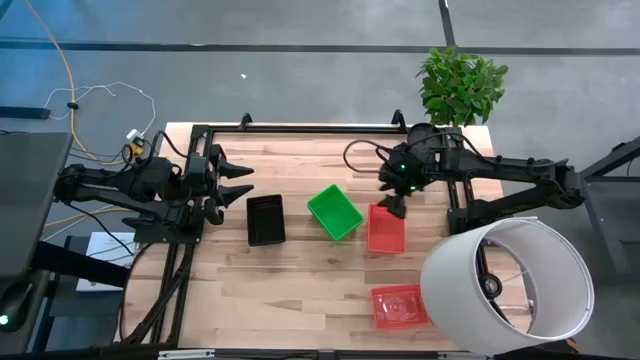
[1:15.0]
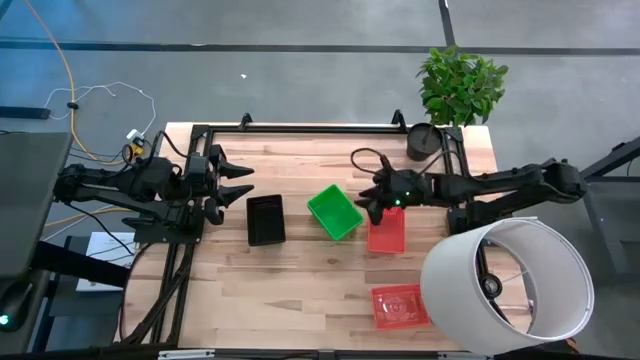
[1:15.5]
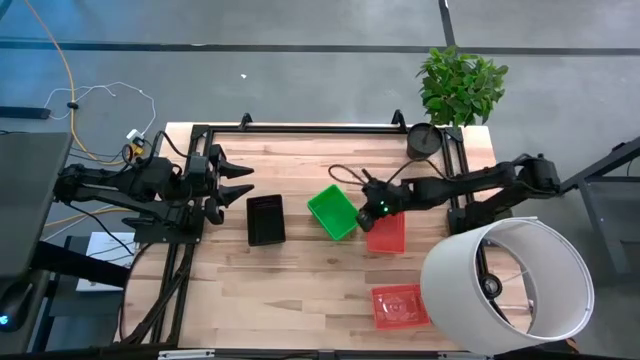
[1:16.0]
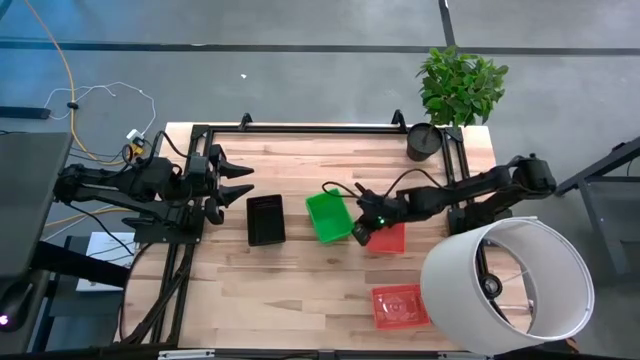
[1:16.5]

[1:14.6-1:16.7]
Adjust the stacked green baskets

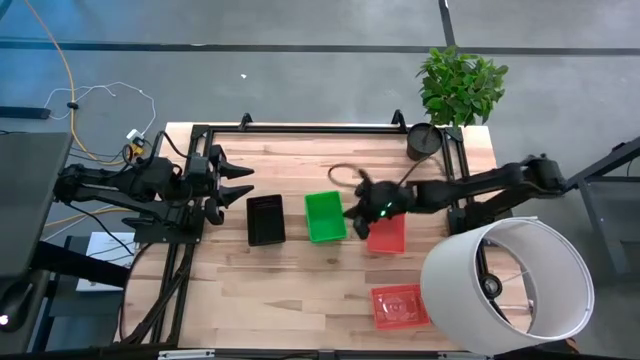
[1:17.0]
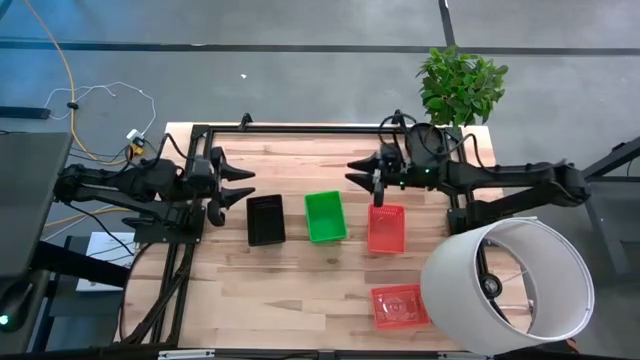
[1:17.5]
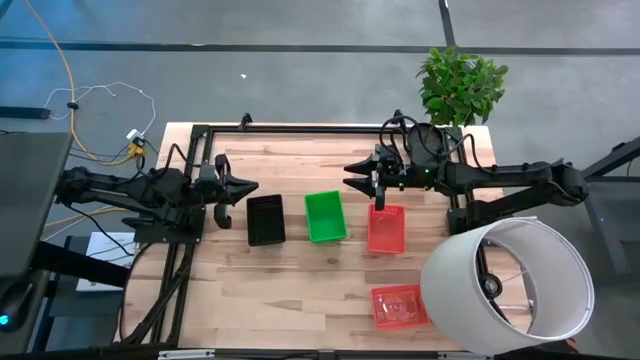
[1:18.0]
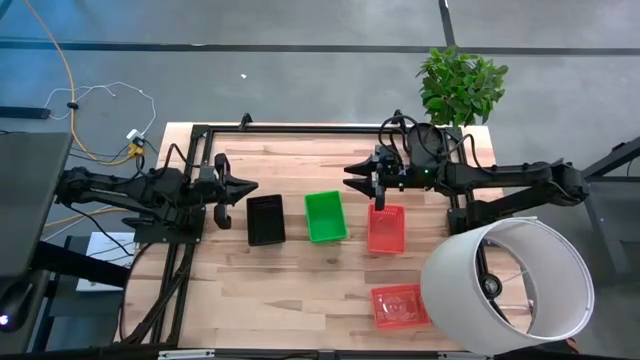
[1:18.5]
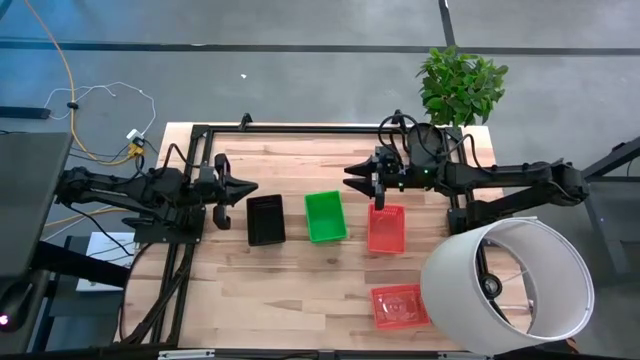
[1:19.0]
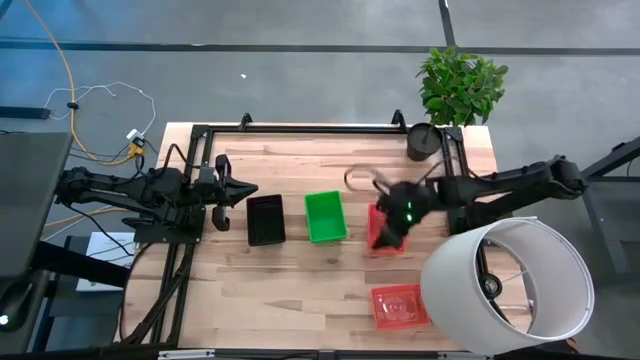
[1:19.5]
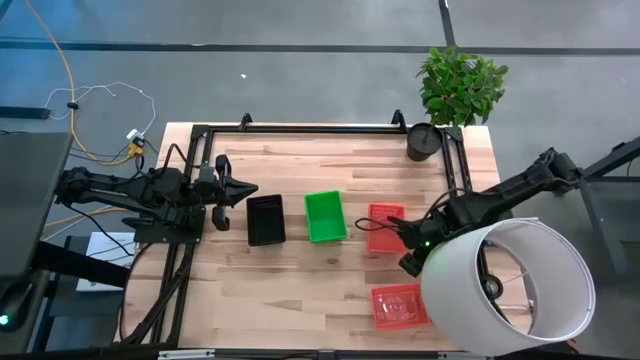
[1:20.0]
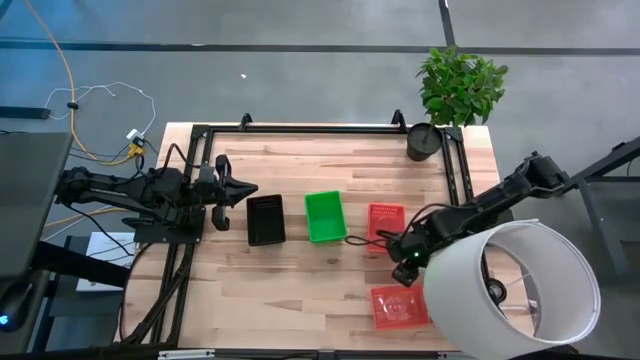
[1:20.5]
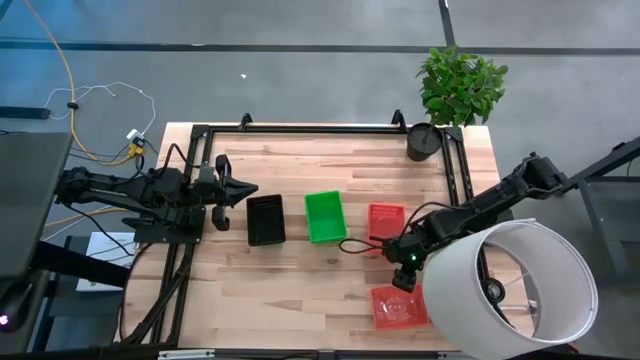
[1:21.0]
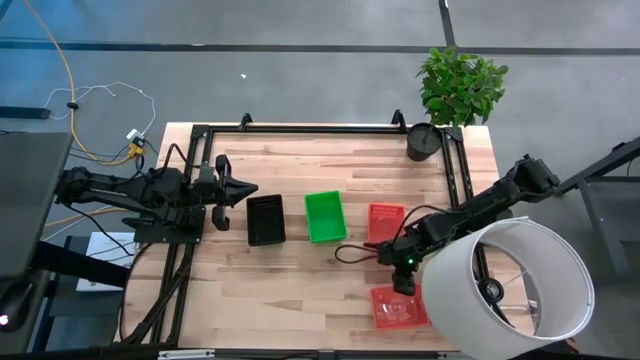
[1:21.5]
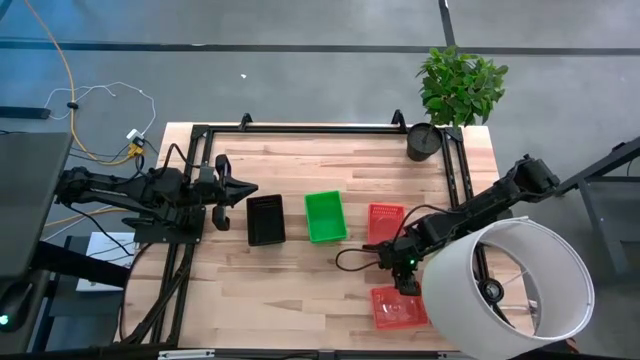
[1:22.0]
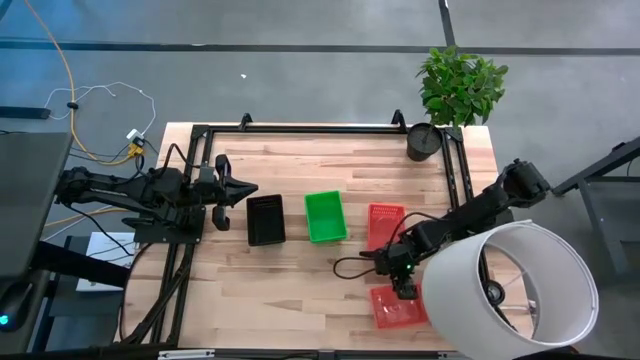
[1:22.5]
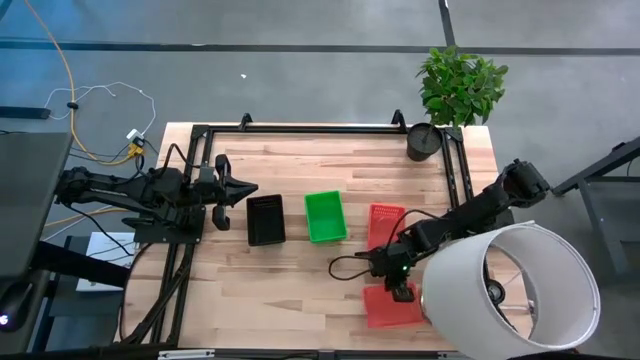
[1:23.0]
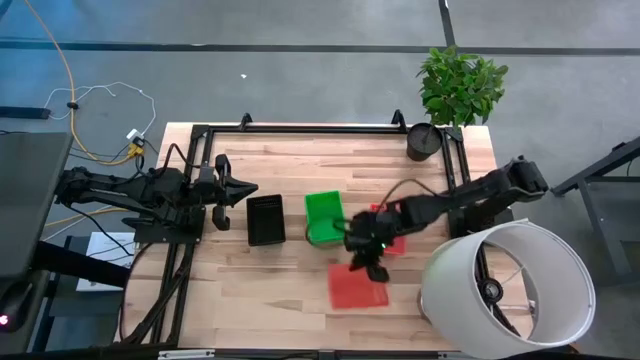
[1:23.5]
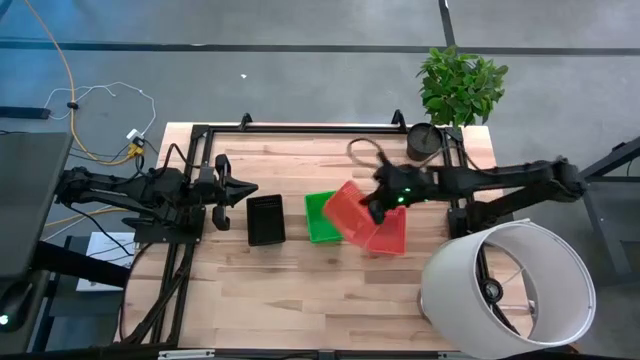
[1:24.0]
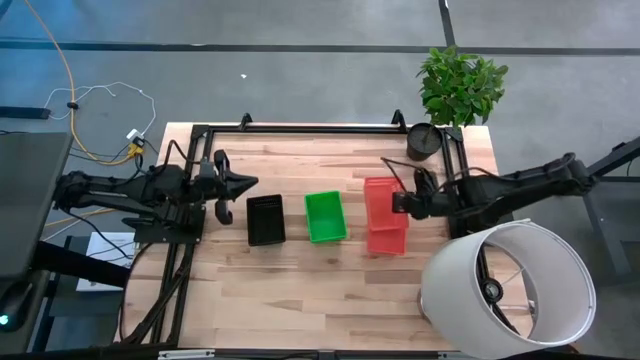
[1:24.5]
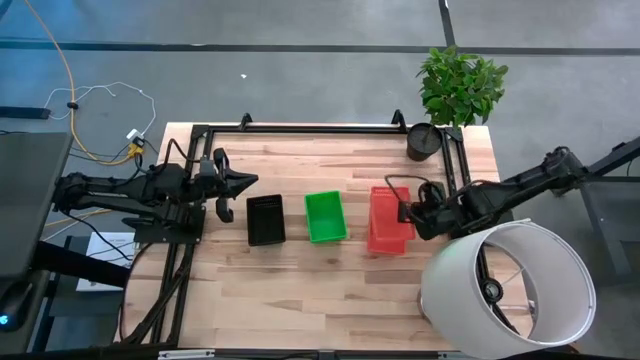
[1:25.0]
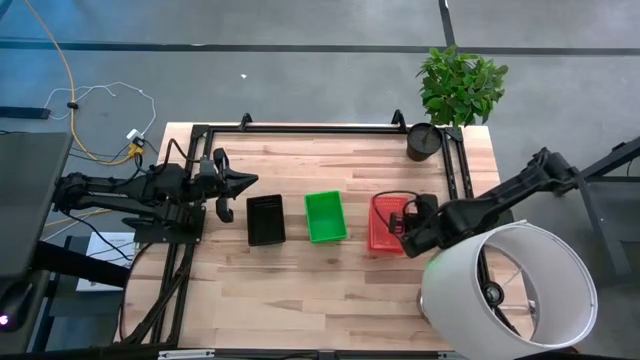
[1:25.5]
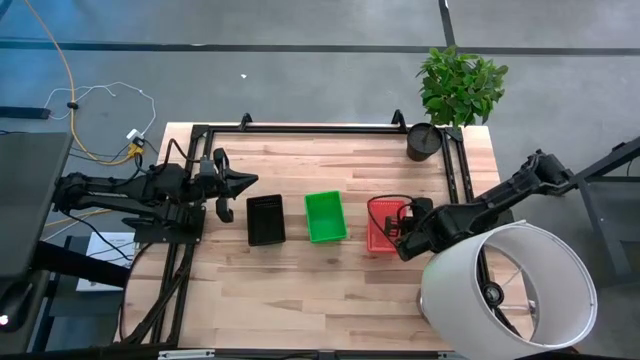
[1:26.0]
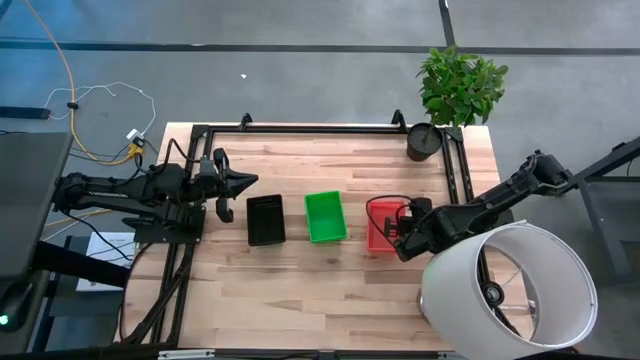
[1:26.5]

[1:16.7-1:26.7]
Stack the orange basket on the orange basket

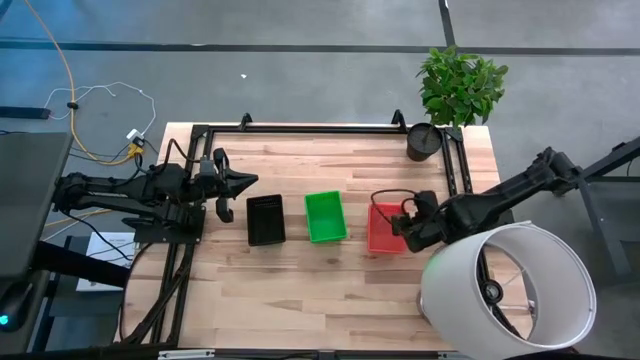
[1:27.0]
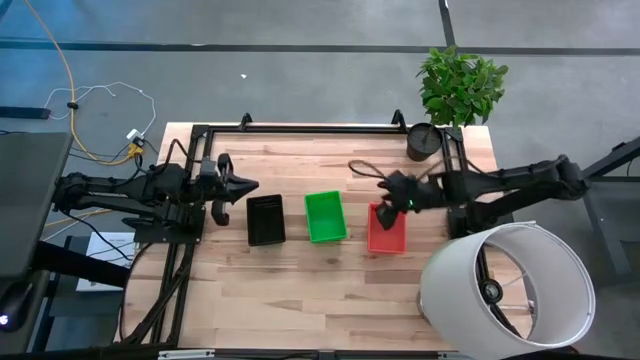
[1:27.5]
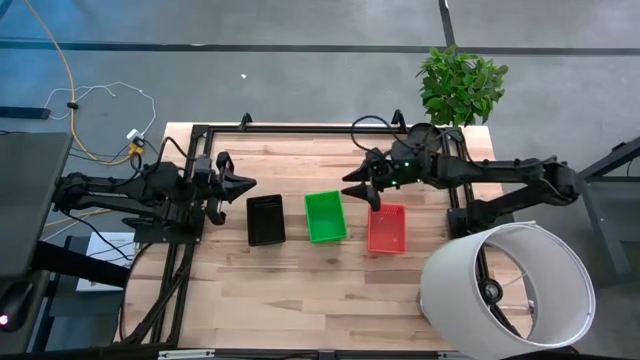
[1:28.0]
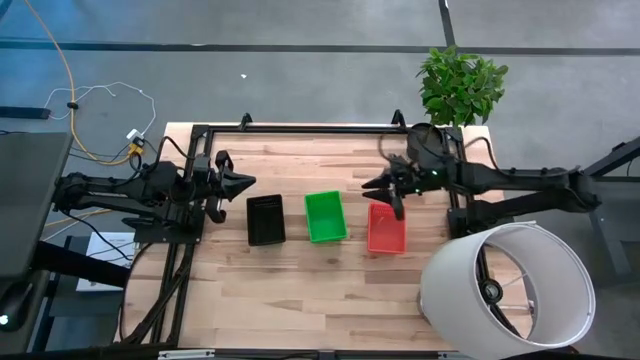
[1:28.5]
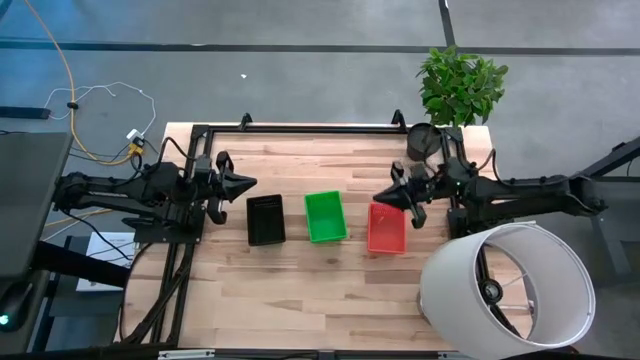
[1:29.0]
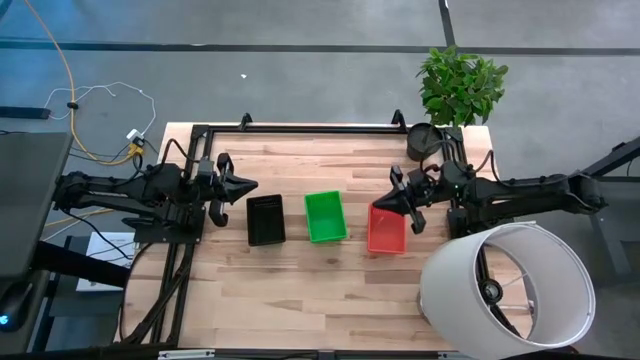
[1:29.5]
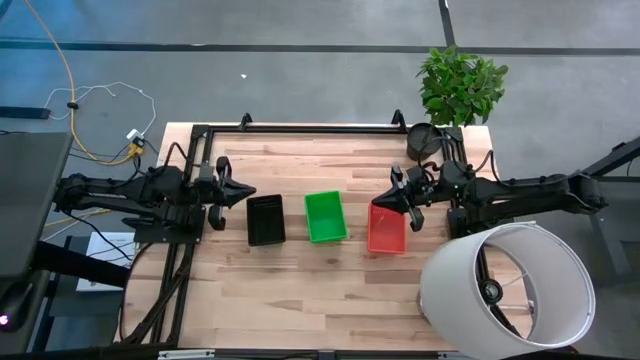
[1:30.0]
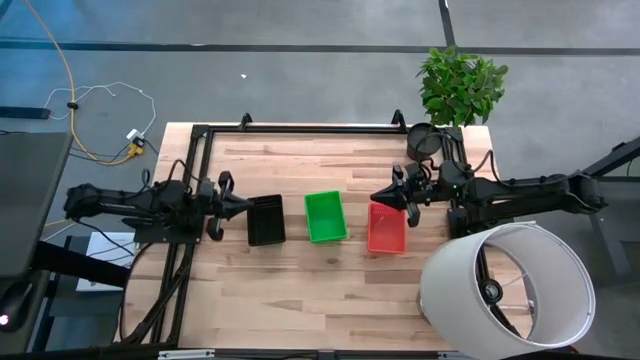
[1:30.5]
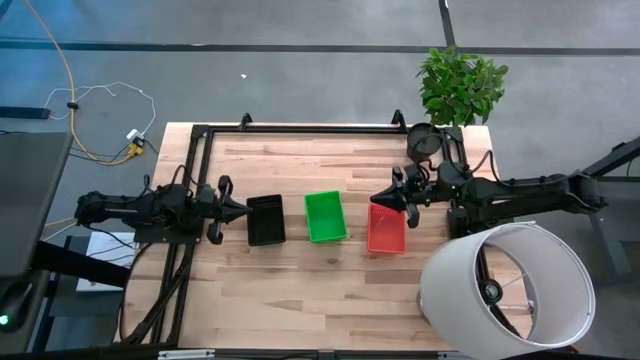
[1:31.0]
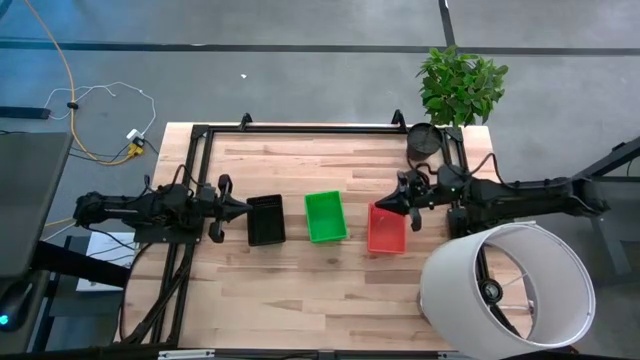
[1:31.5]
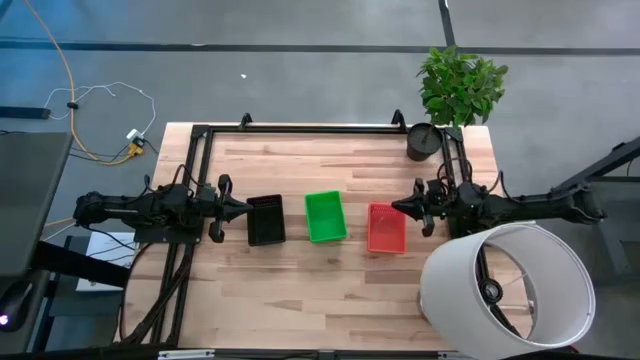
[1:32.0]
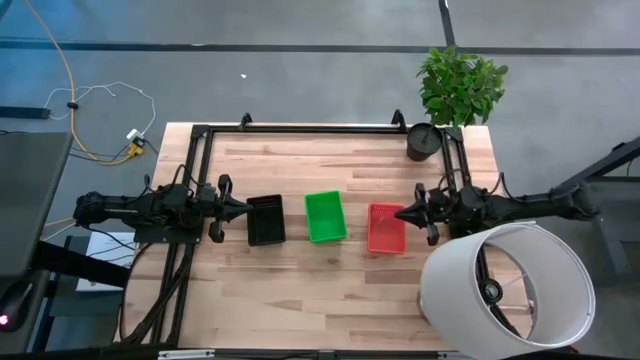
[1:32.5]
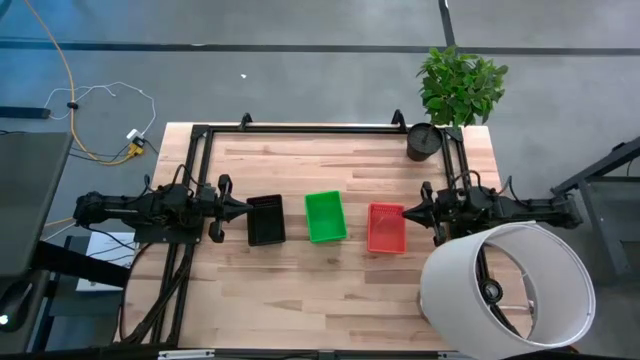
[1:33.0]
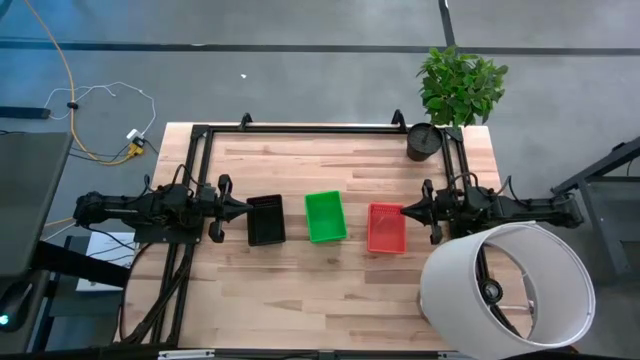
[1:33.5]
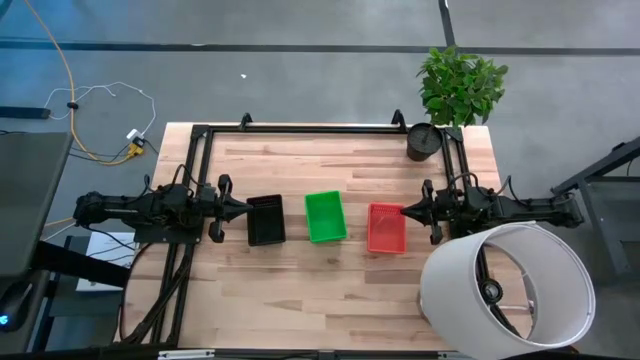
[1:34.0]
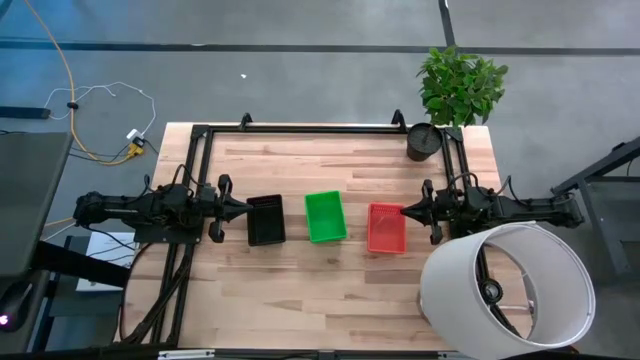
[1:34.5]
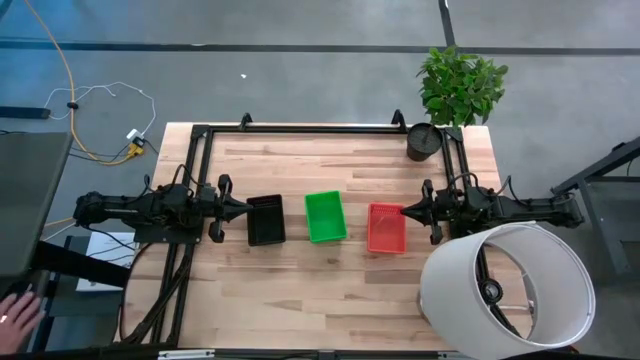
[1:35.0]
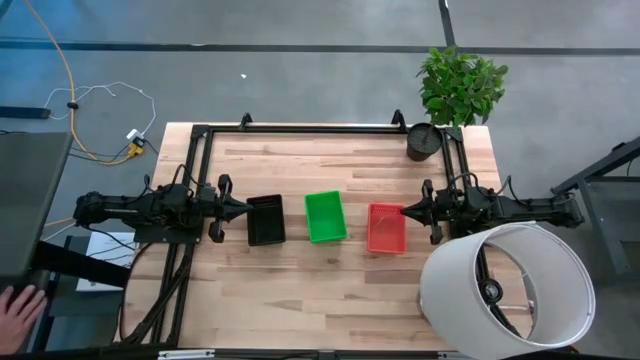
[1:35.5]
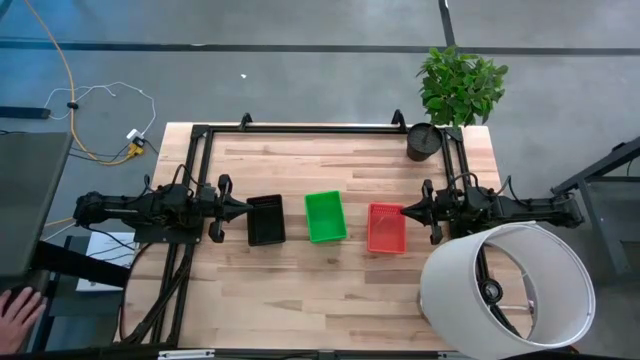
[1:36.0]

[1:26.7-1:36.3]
Return to Home Position
